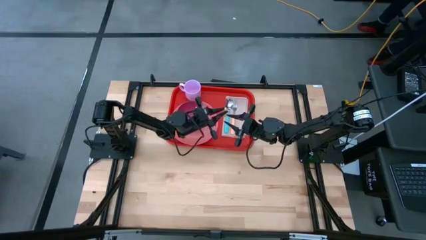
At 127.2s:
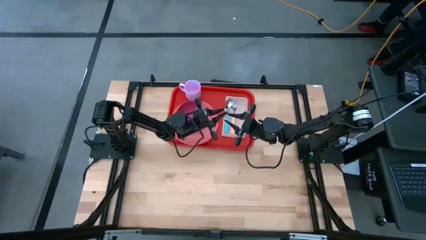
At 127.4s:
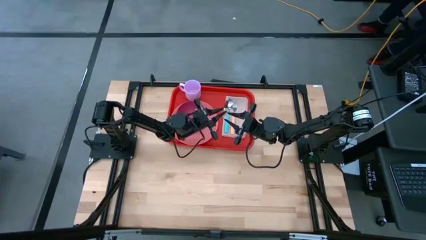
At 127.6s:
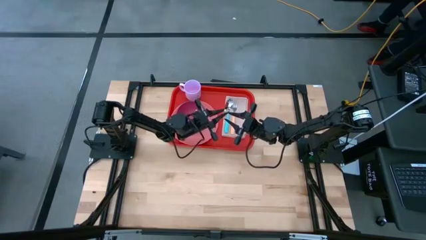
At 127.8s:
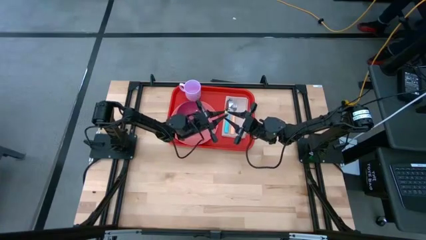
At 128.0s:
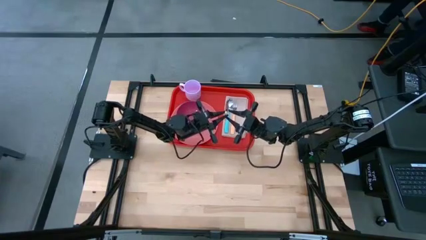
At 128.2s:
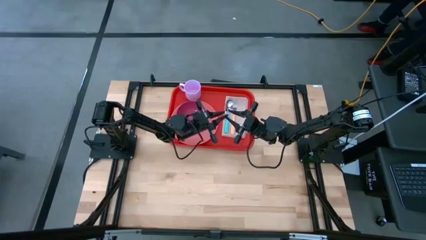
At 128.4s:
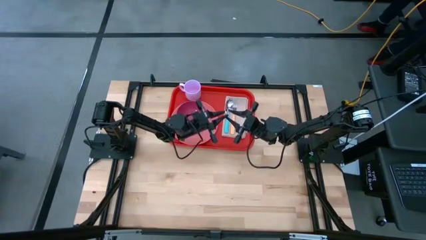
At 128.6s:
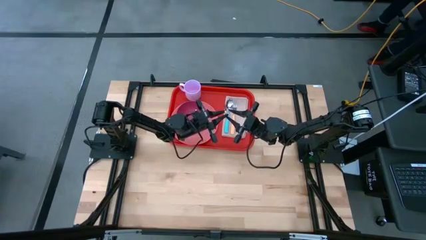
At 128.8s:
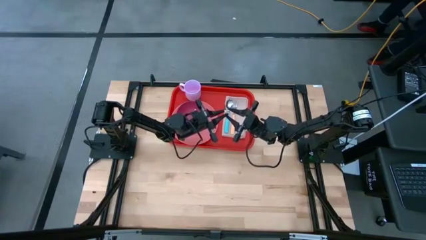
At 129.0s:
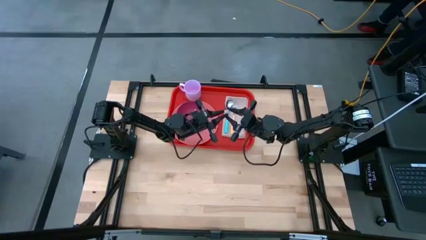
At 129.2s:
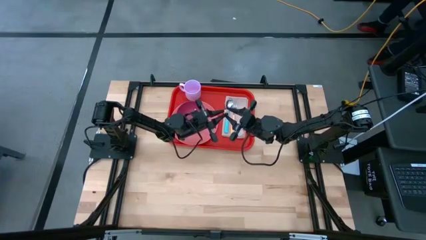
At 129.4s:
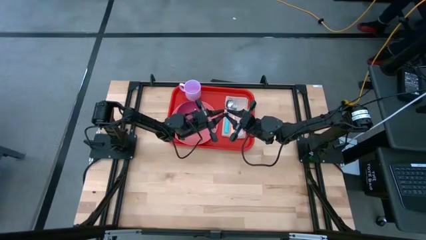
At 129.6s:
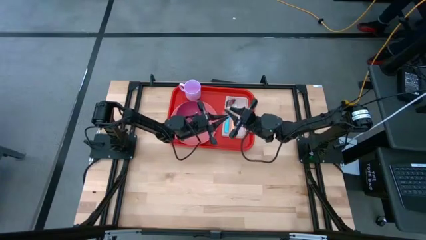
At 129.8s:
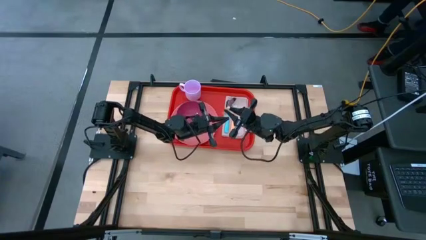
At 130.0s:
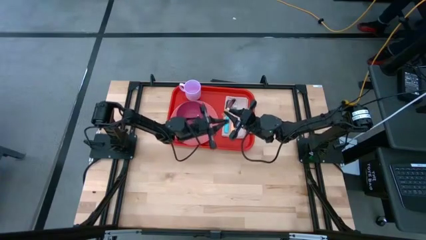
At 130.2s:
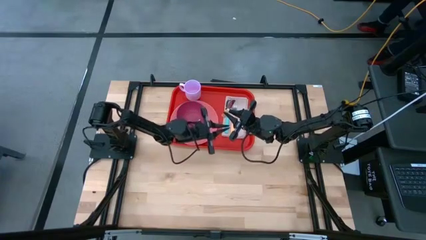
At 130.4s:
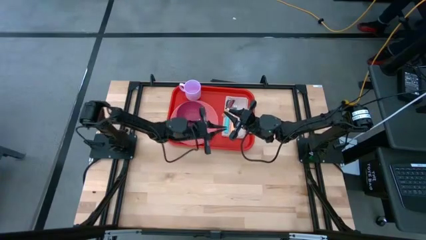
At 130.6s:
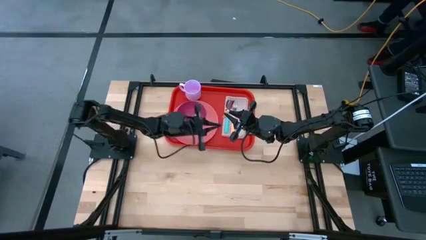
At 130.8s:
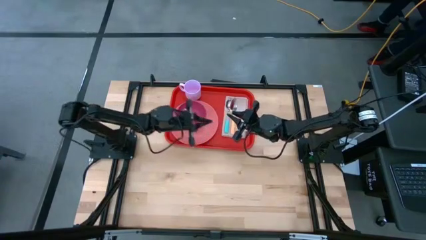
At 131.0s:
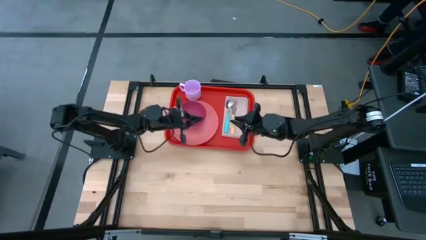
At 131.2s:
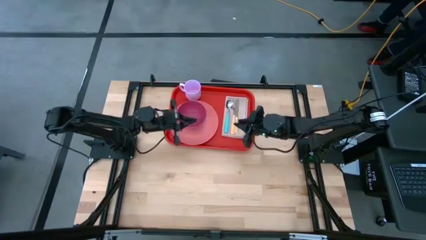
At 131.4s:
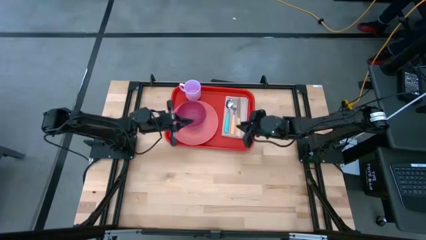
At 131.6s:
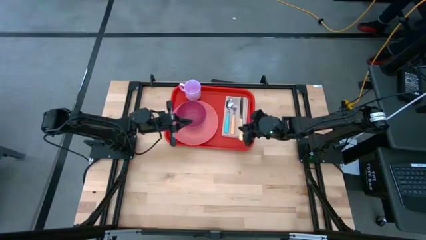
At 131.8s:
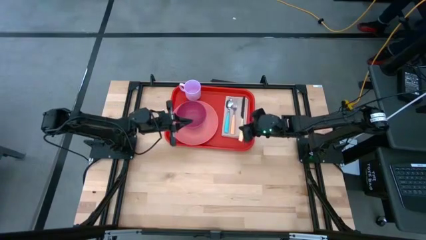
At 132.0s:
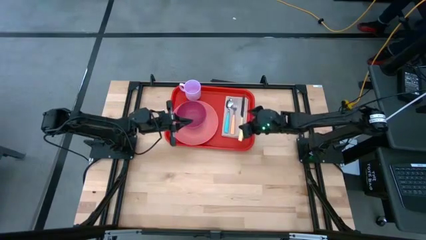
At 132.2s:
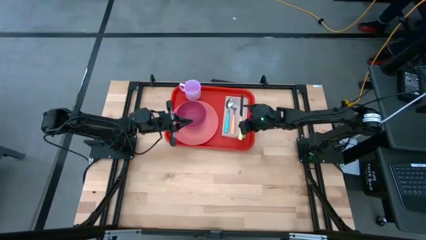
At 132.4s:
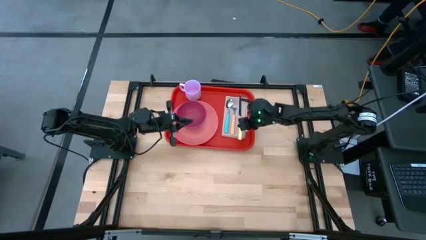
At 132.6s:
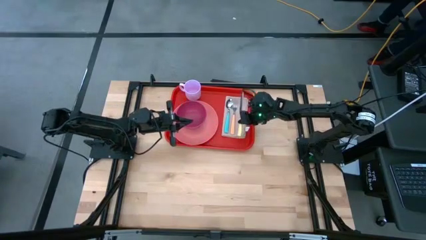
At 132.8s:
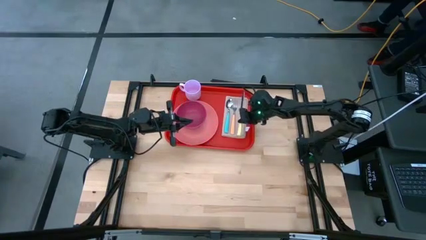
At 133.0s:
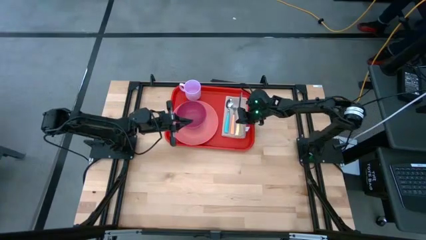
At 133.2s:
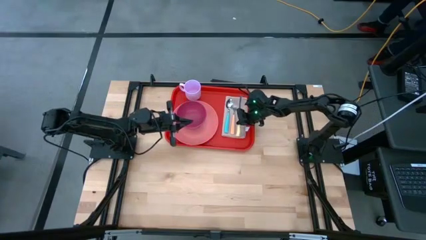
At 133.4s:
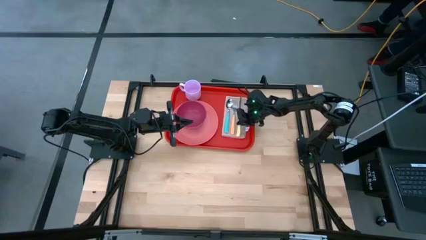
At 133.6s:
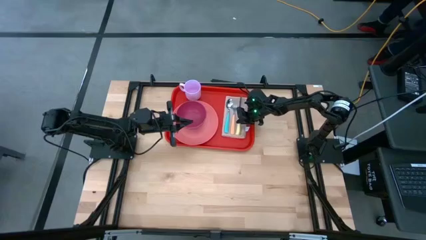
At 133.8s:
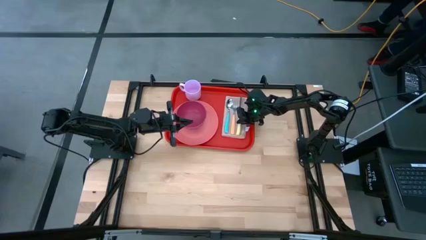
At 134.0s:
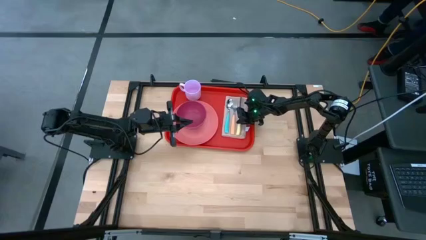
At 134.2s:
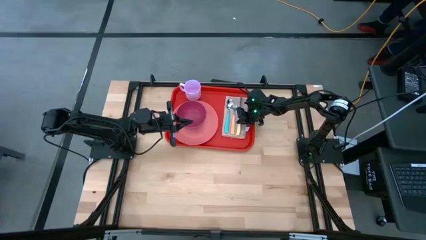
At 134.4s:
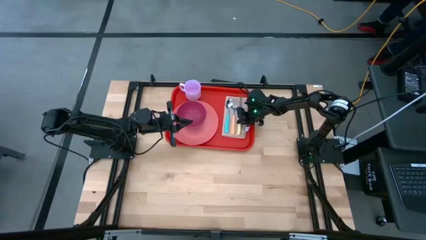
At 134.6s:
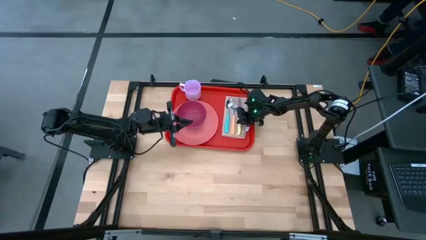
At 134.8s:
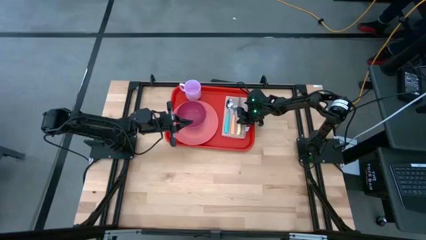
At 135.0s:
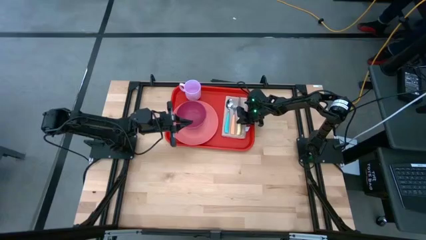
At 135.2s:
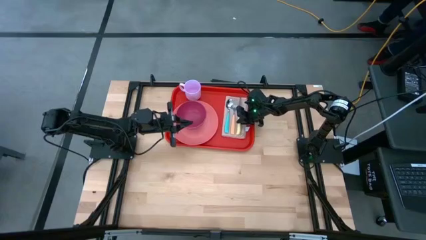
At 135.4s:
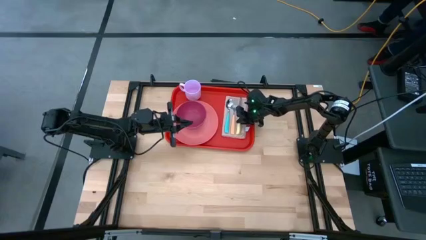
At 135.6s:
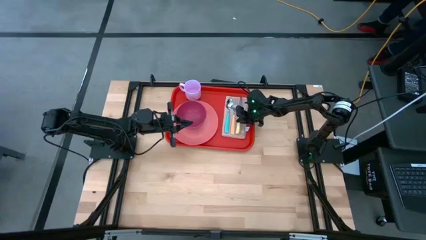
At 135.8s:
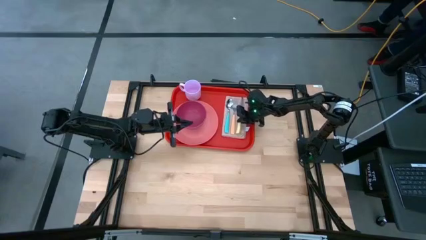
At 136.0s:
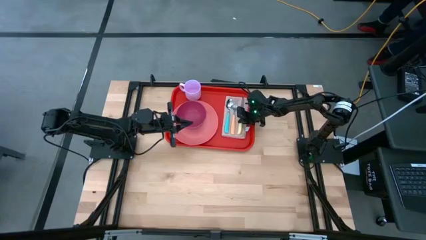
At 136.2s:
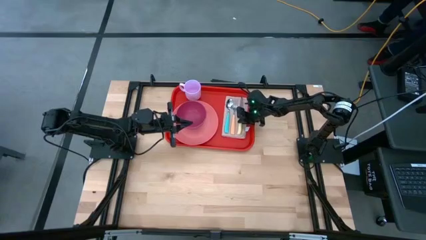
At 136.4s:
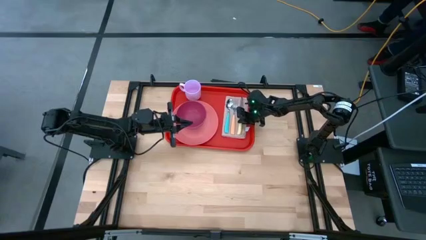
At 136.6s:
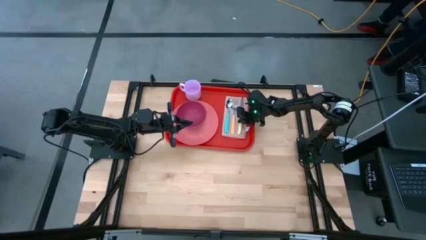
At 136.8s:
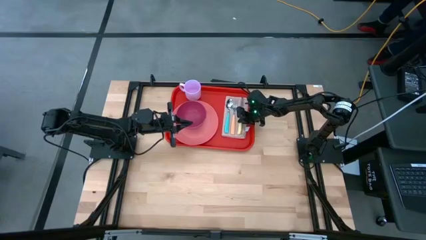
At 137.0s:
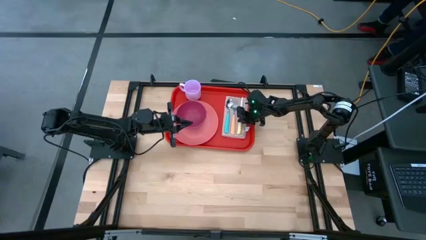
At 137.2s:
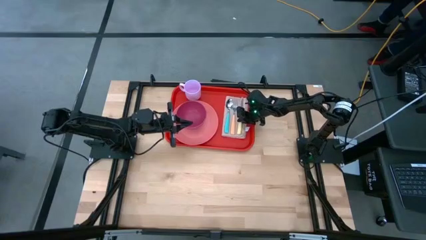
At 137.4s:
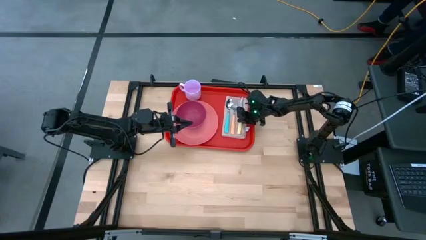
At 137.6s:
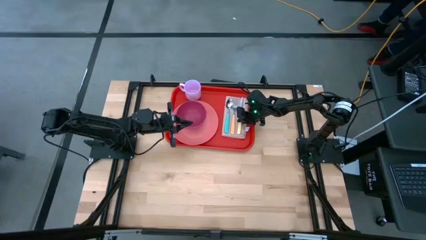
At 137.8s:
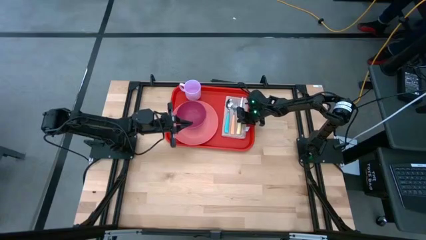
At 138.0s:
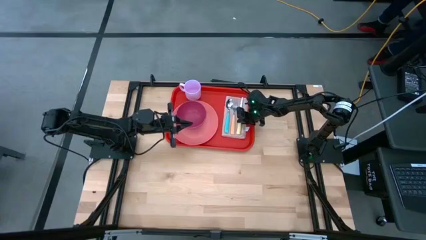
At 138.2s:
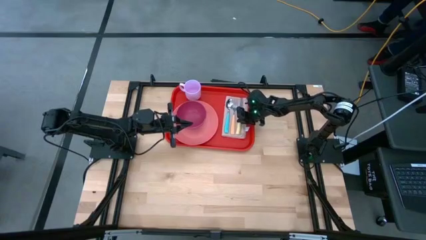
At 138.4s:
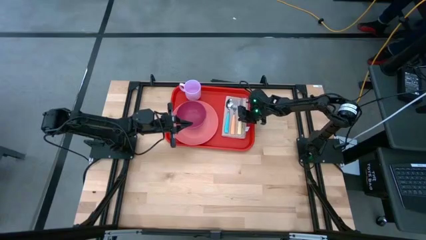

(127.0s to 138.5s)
Task: Set up tray
Put the yellow knife on the light brown napkin

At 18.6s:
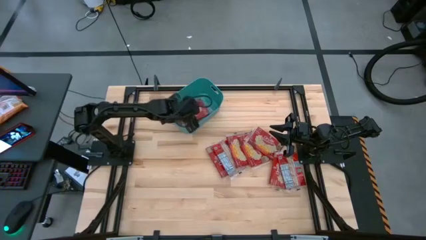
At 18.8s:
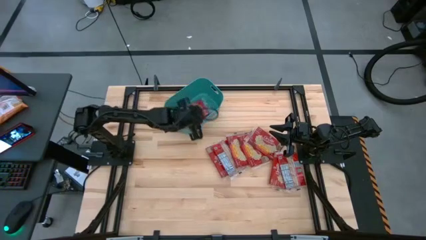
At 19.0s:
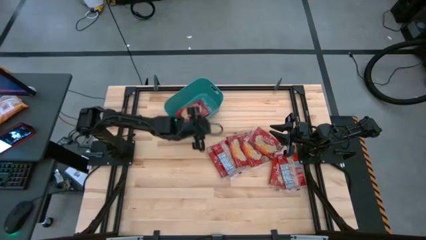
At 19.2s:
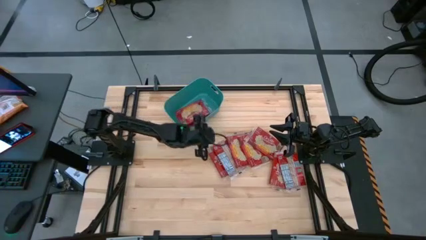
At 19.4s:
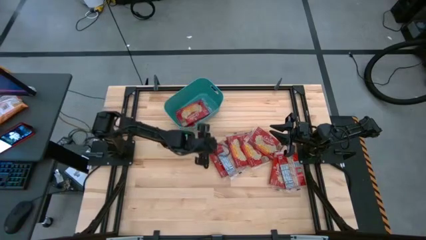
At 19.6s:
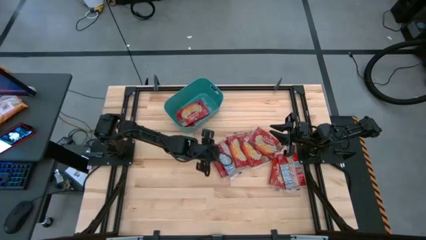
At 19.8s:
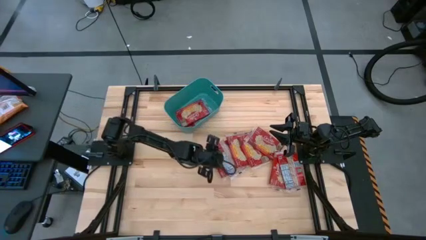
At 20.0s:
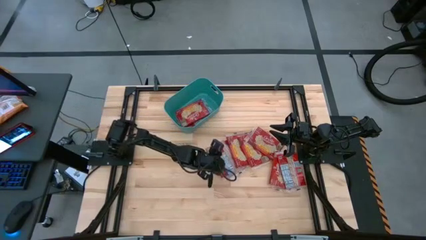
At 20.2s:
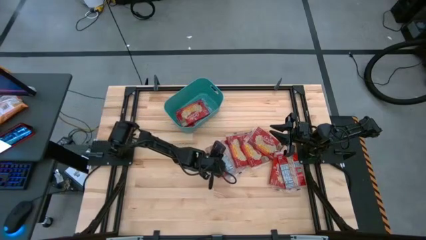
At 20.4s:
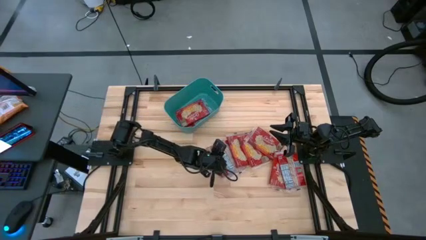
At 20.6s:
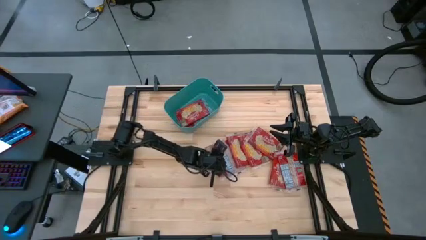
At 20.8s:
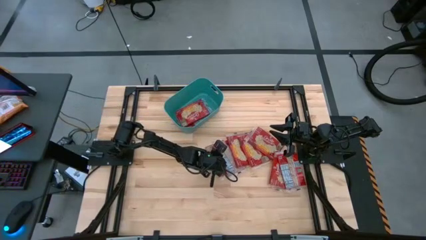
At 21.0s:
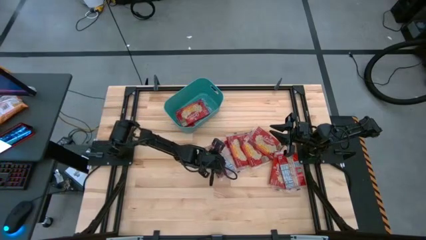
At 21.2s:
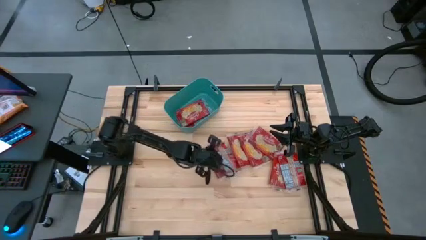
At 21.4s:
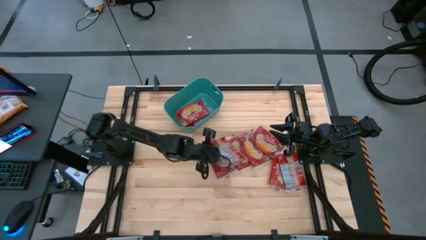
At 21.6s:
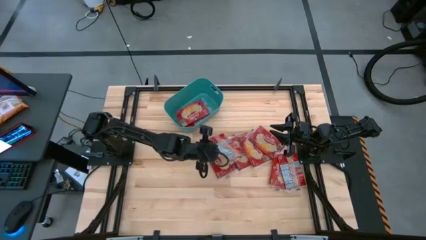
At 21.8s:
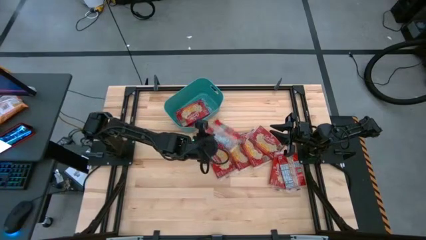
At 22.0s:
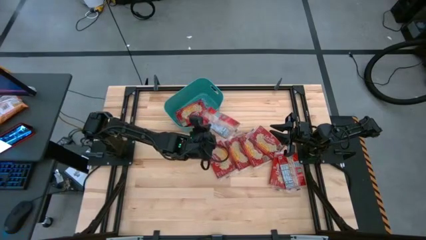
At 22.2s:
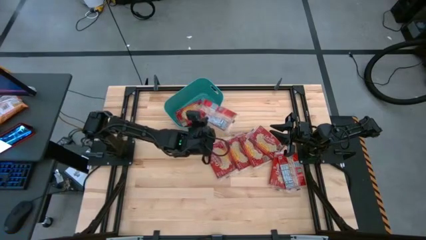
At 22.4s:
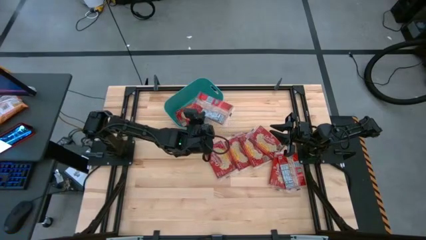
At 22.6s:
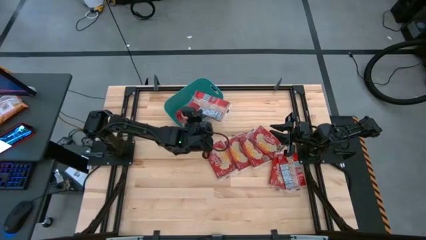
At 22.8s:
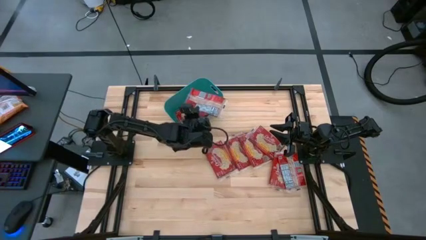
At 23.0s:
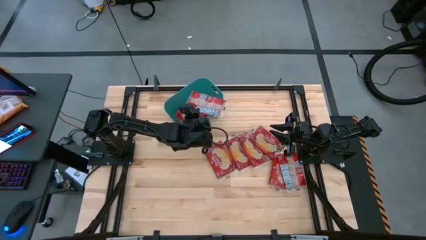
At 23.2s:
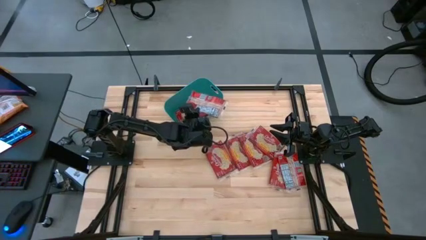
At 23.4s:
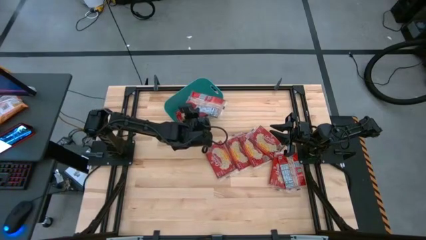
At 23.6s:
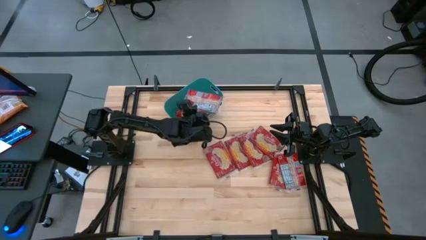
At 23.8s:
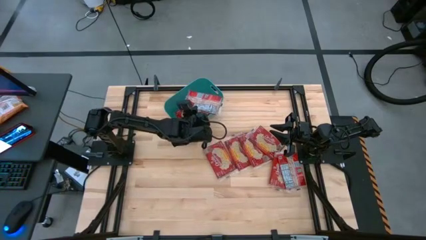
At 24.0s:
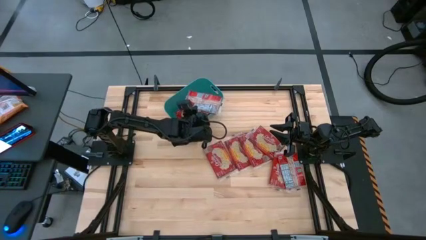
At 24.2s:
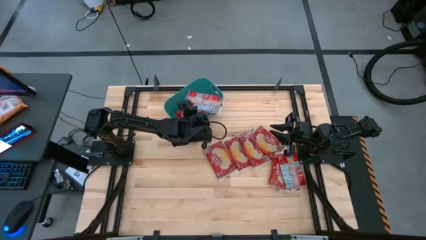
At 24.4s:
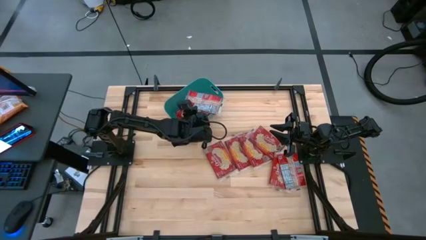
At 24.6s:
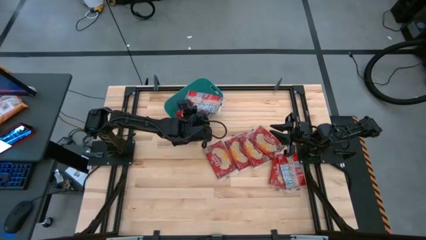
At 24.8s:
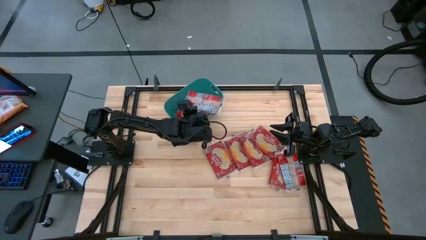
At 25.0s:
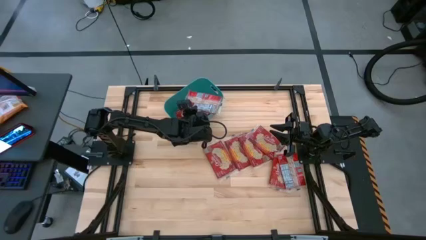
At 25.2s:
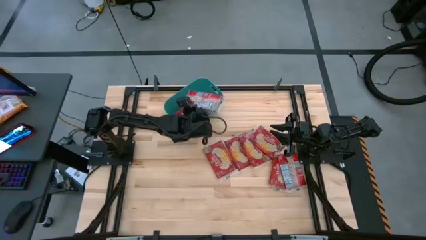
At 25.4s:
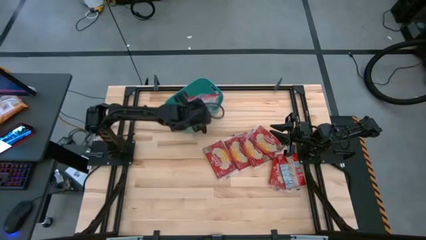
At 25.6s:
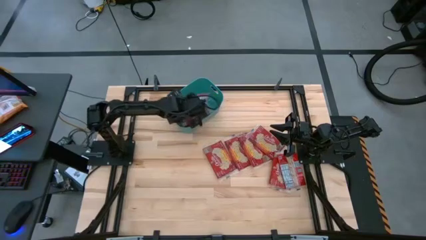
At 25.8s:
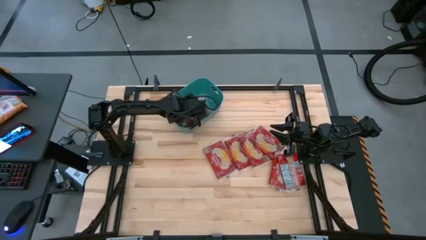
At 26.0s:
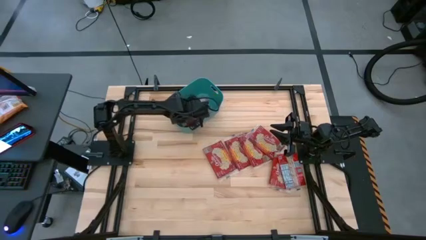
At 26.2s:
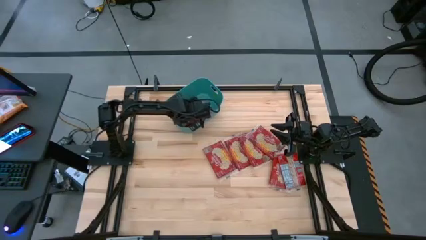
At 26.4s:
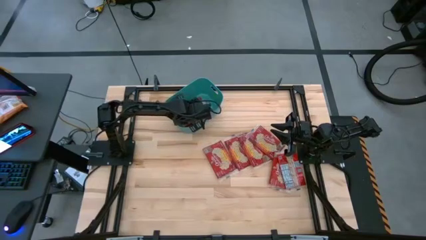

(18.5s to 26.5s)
Task: Sort popcorn bags into baskets
Put the red popcorn bag into the green bin
